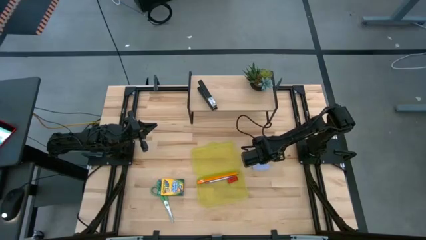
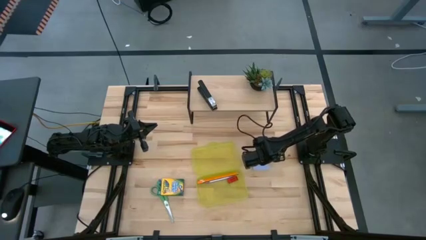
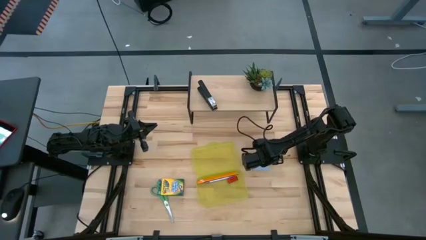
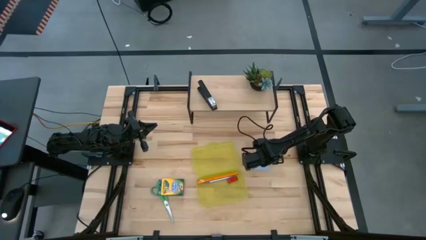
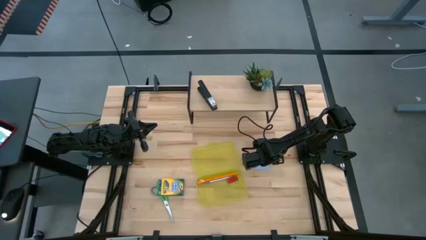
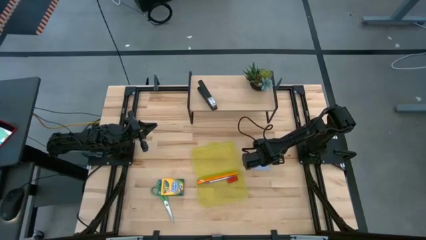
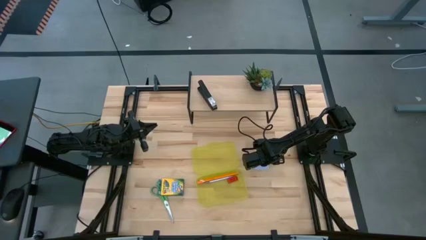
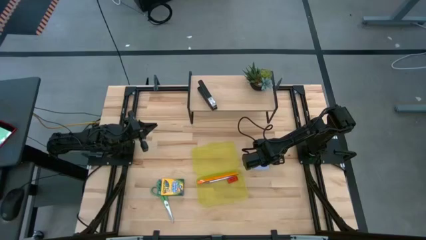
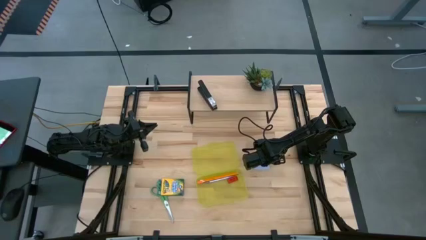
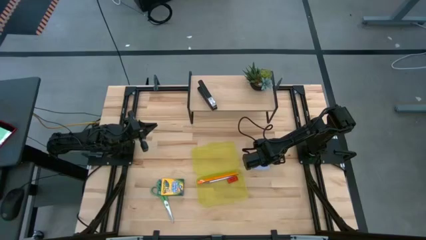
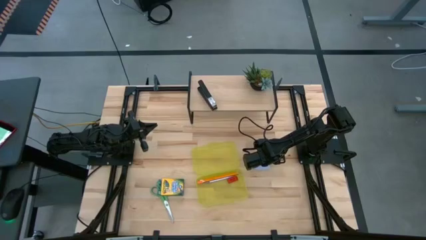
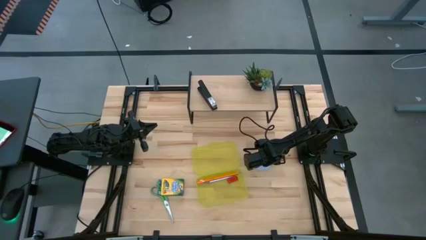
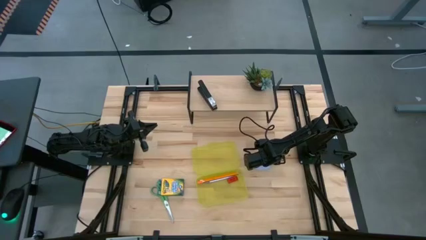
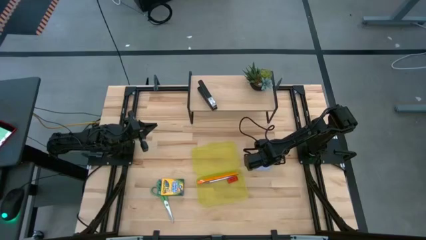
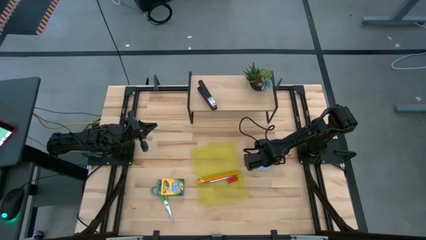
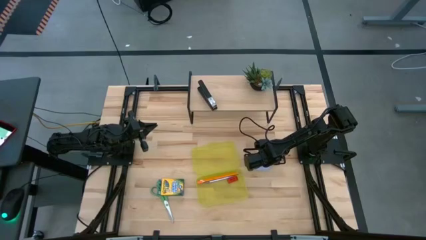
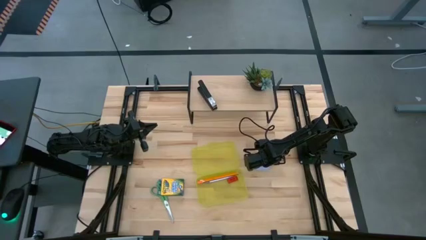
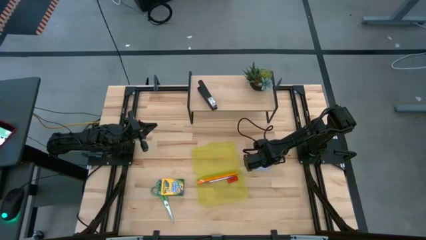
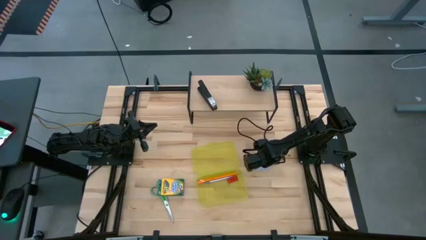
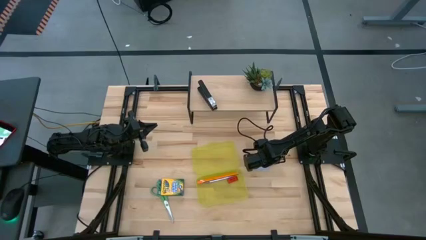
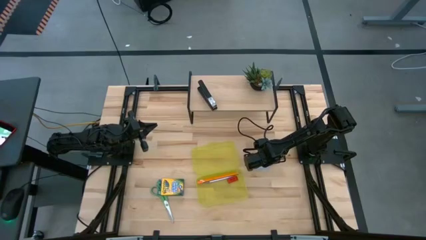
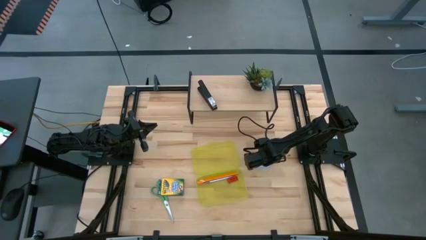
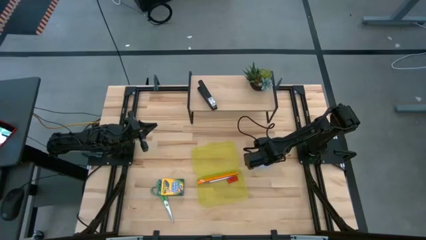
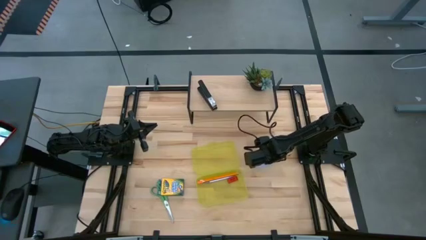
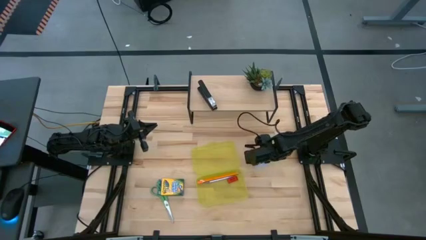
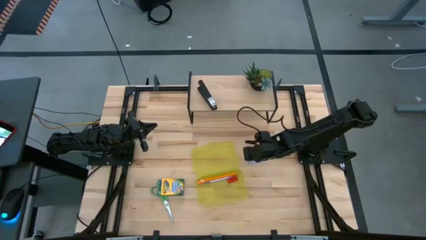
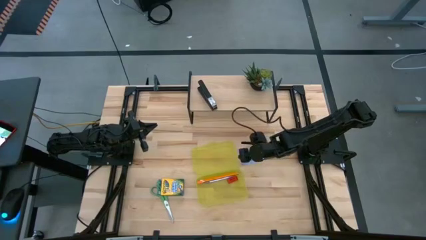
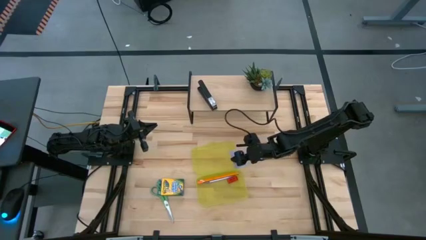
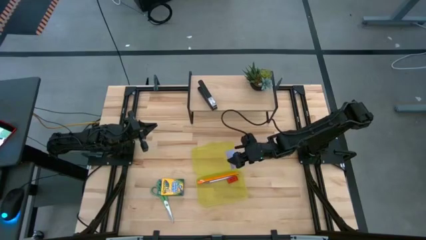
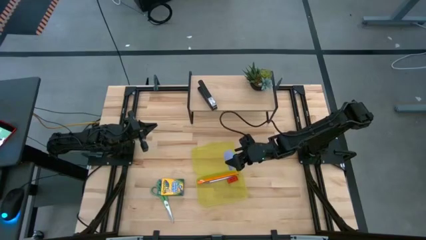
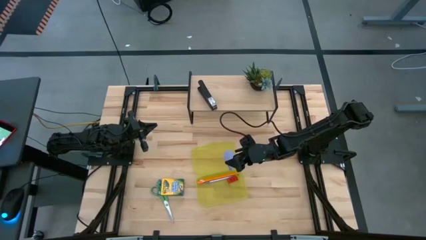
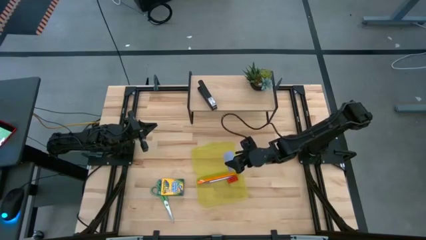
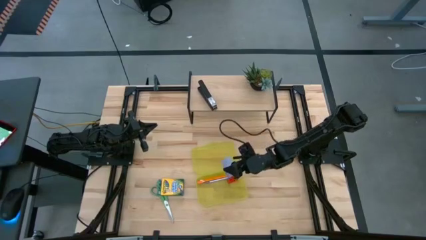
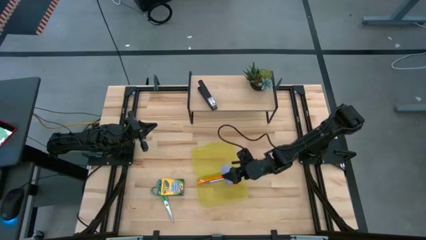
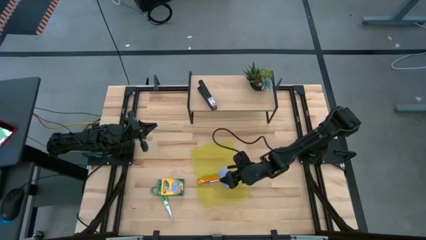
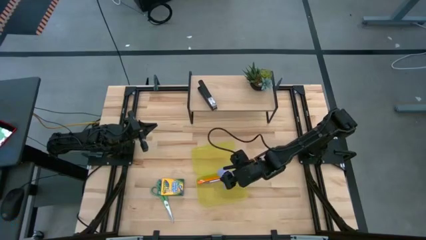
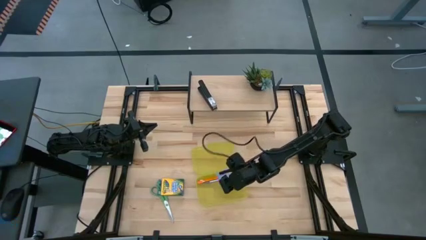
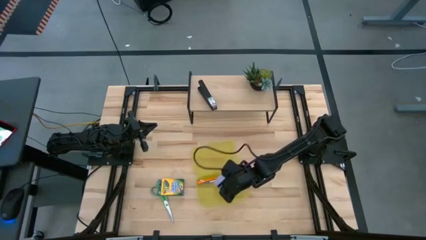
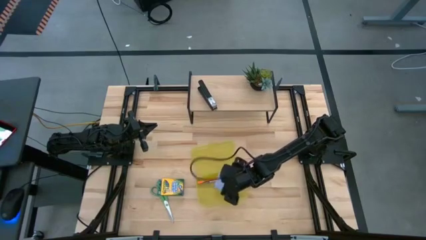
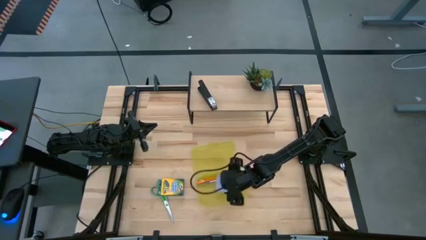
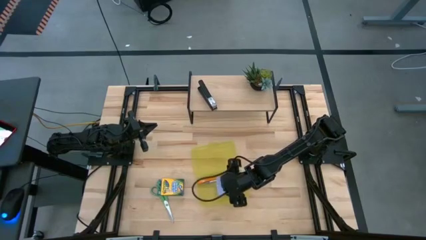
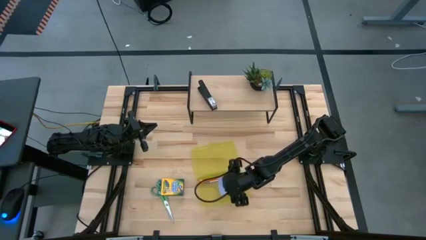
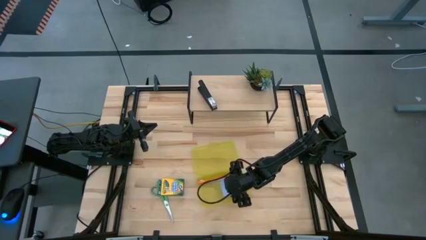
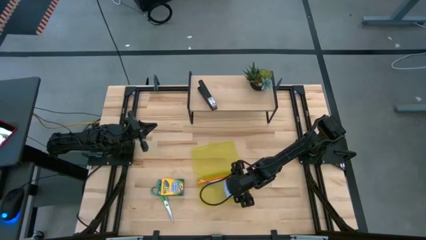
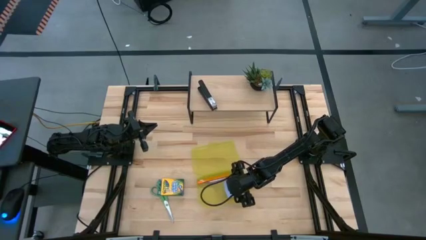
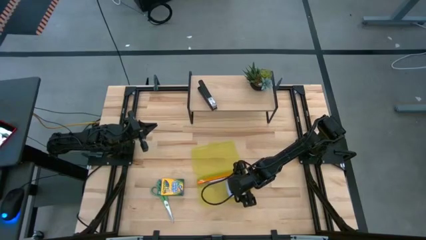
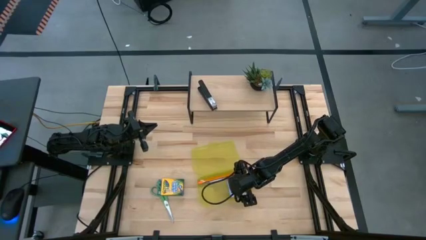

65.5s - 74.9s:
Task: Pack school essentials
Put the white sticky note into the yellow supply box
